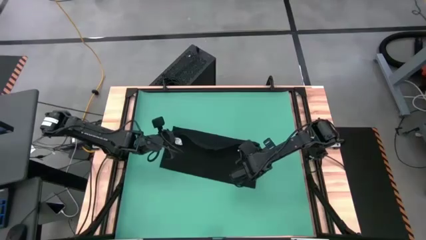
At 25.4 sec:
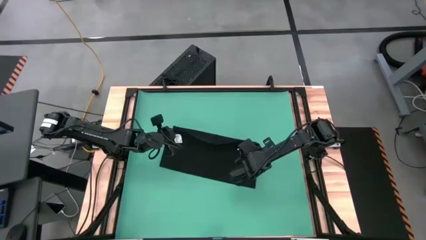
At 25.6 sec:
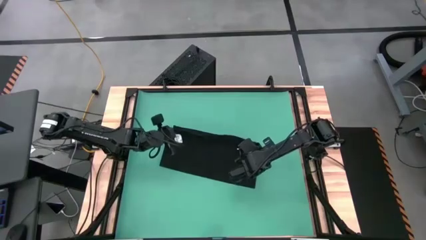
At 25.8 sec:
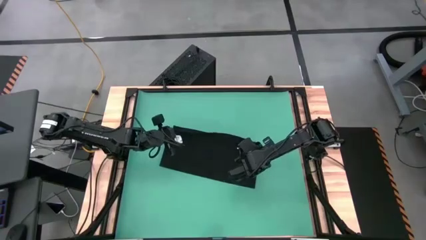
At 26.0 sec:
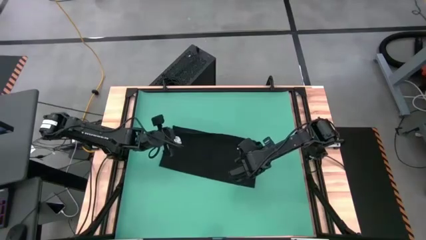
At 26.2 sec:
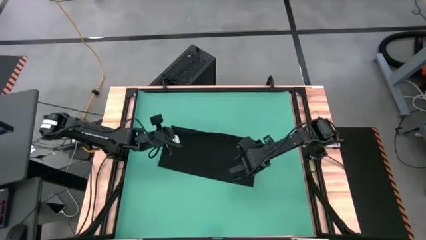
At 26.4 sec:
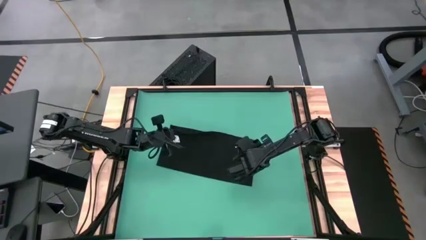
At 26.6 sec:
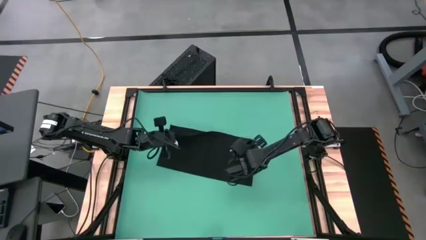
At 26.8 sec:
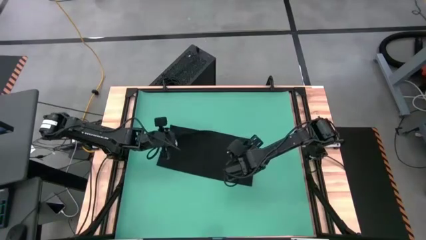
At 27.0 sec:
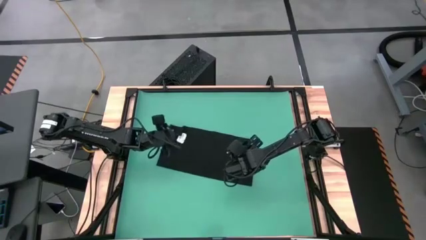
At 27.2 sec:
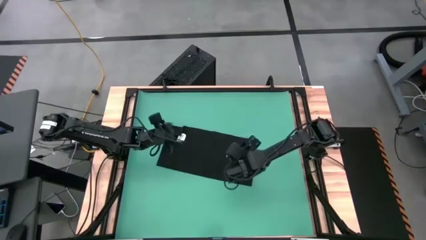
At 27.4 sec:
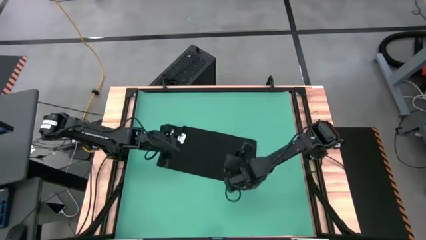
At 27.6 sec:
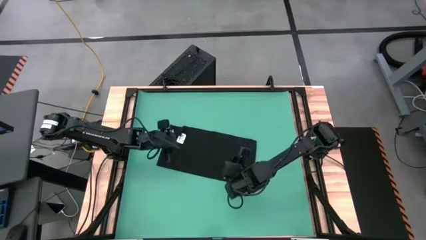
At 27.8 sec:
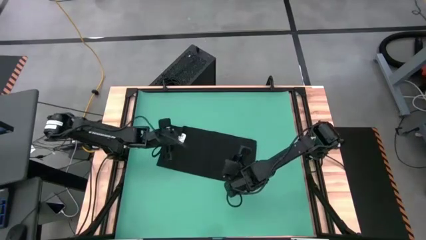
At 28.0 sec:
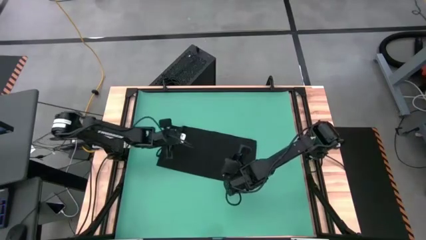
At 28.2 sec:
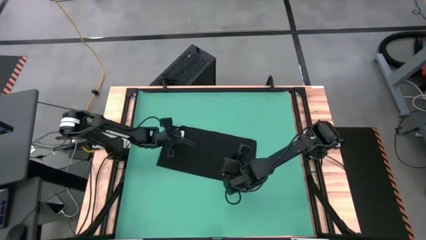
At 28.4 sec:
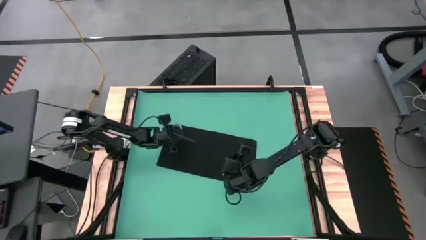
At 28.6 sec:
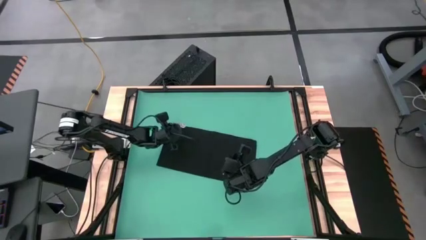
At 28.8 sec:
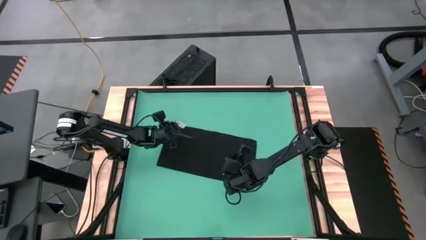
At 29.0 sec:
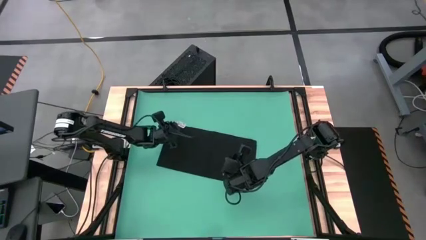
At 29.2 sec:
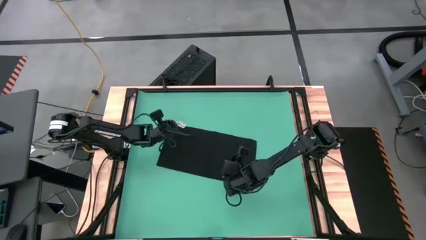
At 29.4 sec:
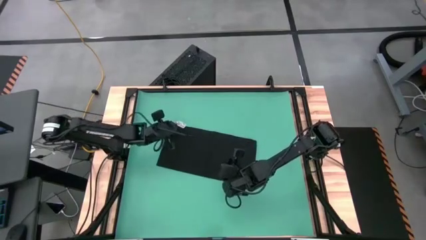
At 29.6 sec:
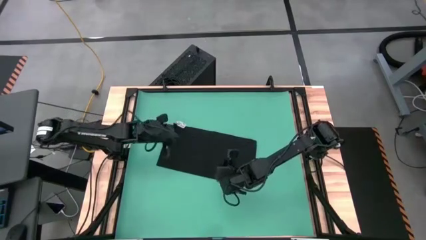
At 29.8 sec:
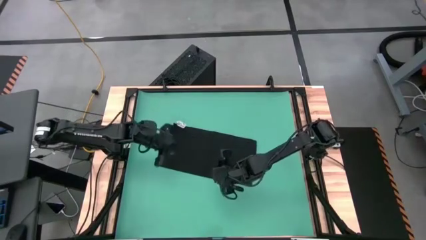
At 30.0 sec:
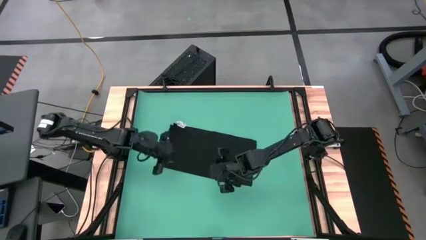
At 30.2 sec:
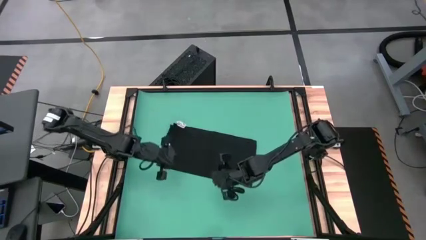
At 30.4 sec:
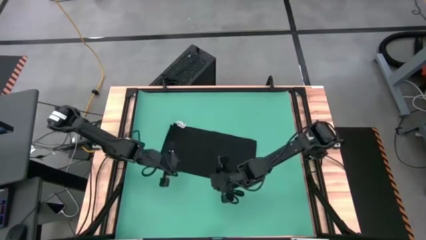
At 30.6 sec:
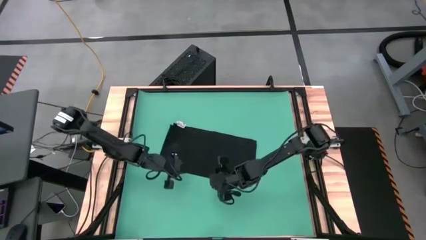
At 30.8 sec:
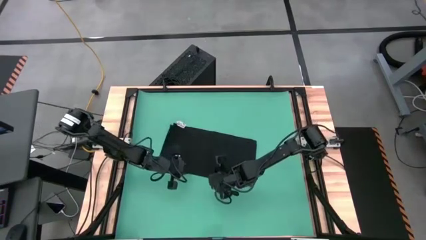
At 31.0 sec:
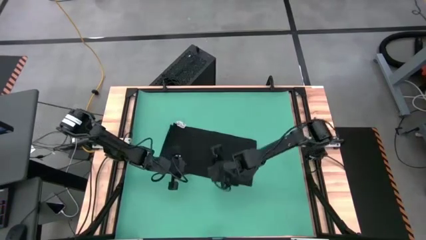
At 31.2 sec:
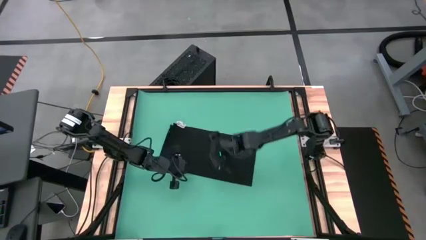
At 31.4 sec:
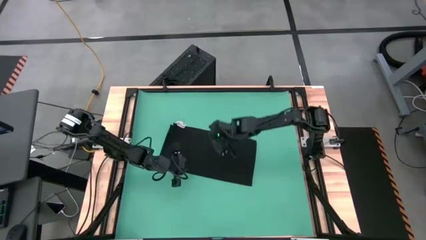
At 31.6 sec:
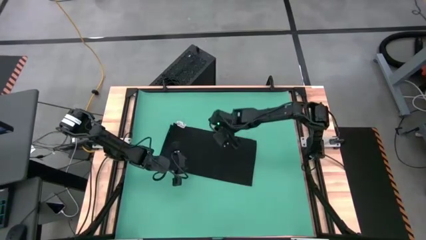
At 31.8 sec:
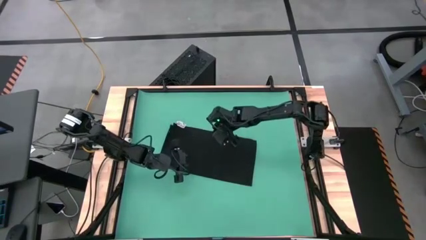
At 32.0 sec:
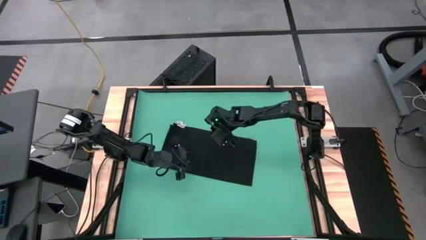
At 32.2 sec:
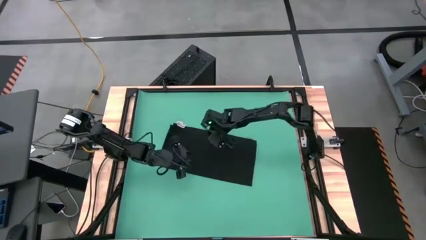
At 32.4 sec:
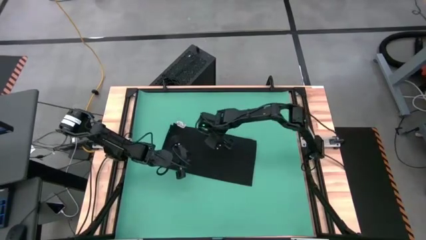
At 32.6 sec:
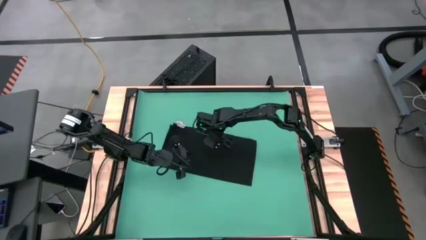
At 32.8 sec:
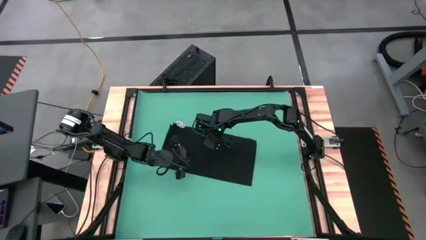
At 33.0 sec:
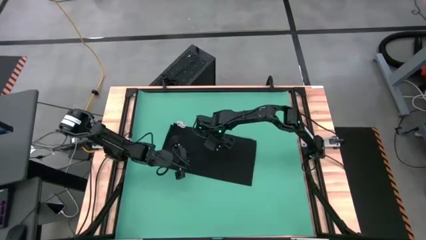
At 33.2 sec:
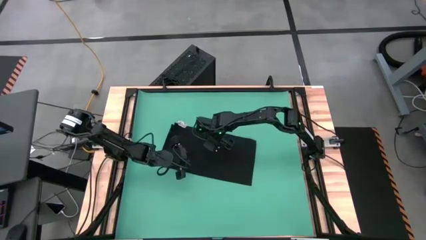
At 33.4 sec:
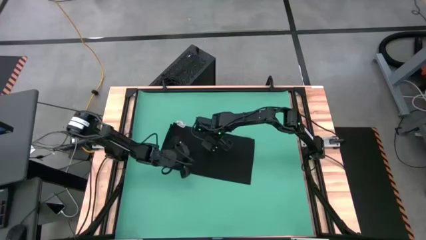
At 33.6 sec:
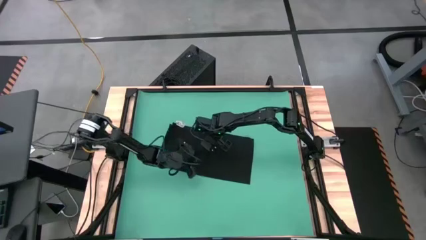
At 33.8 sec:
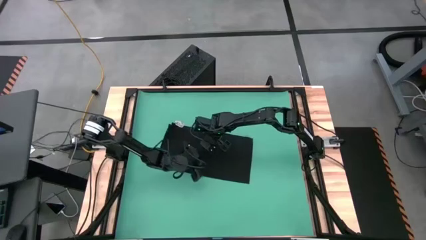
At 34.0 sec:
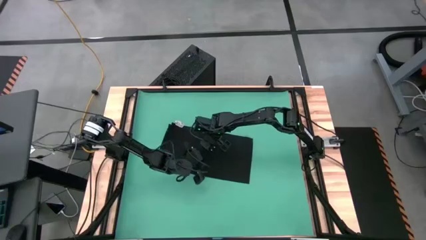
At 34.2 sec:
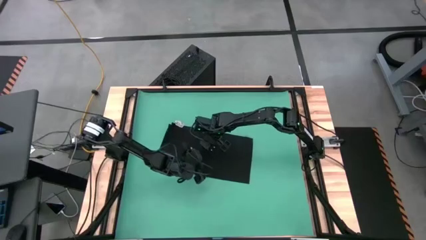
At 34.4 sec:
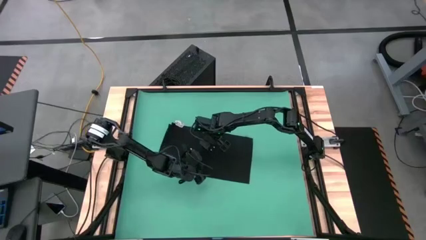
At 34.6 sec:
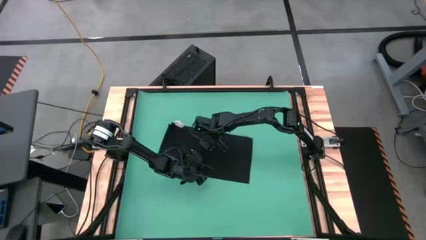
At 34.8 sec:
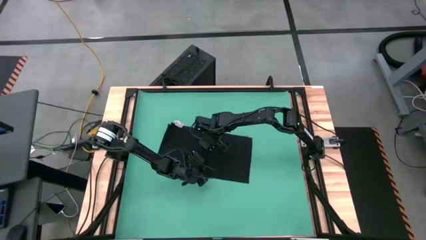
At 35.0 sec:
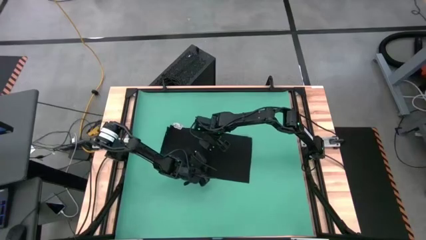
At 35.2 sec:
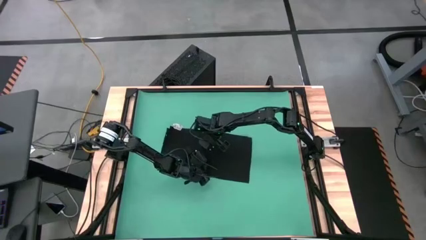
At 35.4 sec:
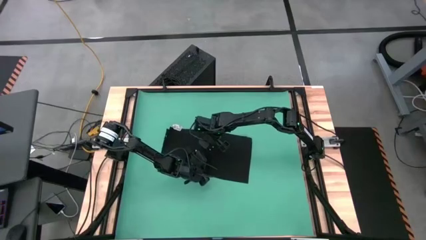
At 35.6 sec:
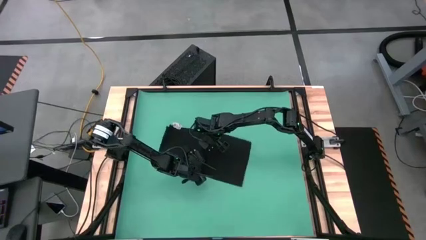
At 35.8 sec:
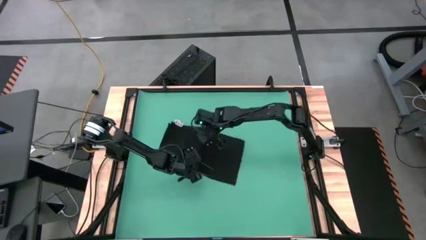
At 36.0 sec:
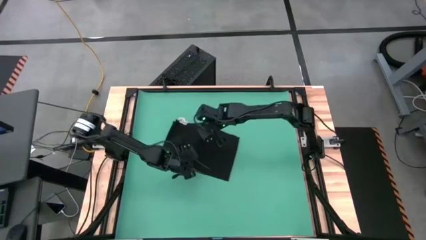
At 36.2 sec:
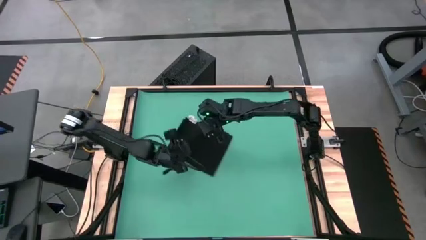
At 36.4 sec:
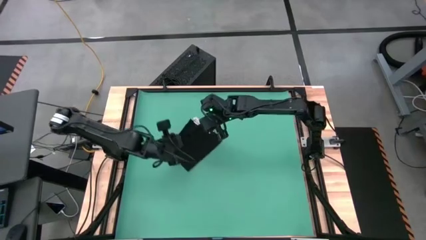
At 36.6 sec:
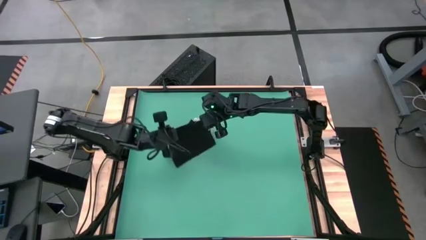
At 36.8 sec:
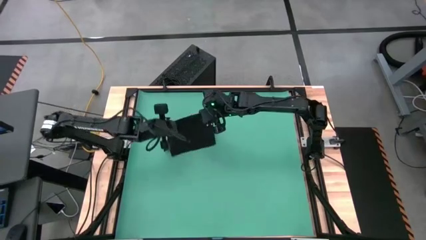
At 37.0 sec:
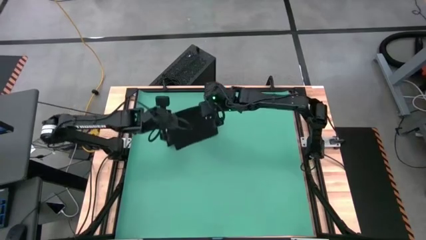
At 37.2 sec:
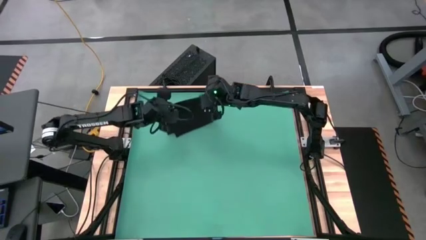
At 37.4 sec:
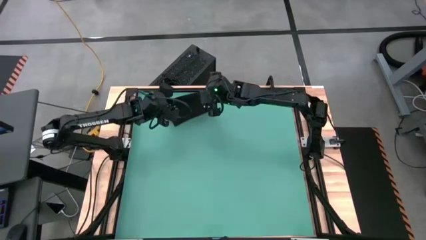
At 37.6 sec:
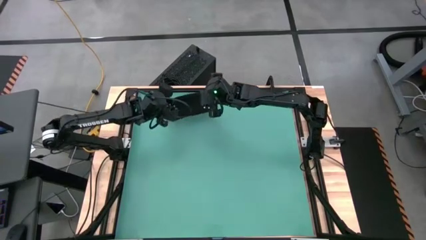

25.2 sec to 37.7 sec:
Task: Roll napkin
Fold the black table napkin
